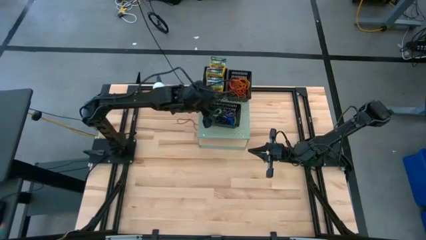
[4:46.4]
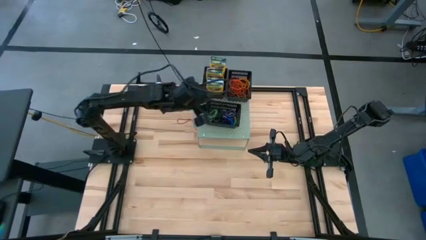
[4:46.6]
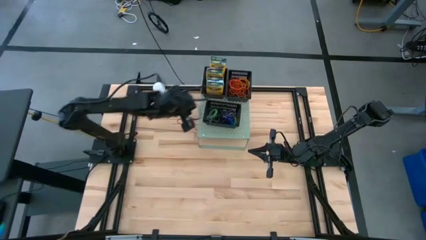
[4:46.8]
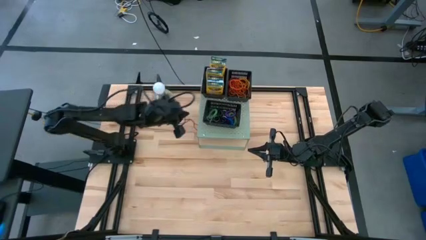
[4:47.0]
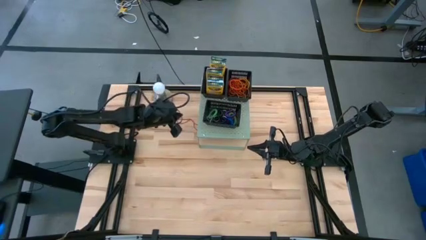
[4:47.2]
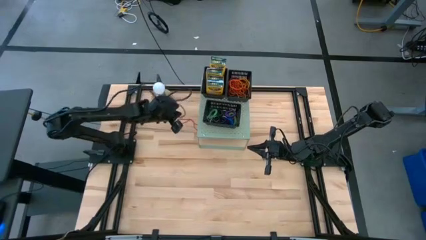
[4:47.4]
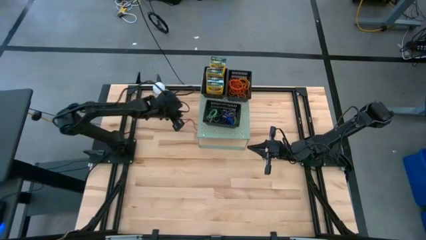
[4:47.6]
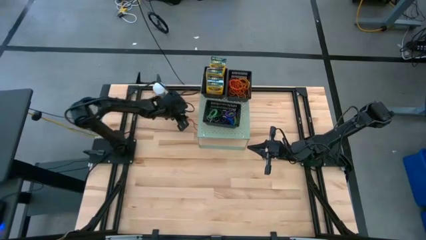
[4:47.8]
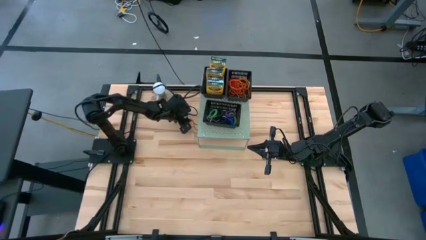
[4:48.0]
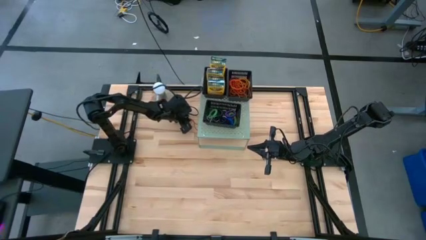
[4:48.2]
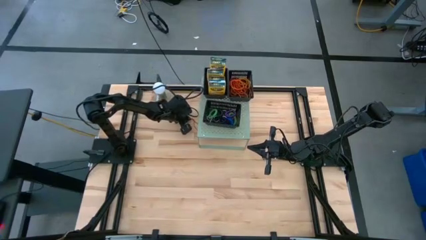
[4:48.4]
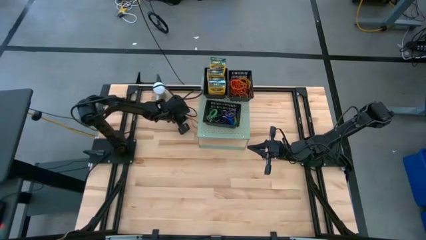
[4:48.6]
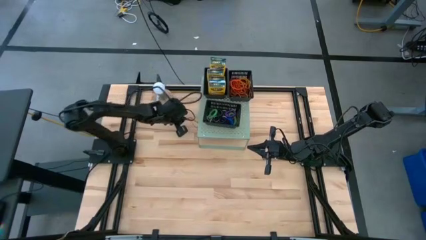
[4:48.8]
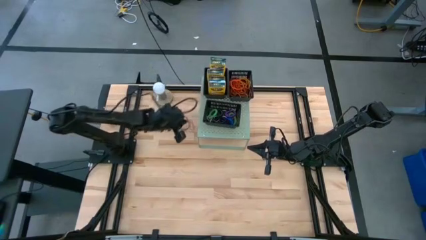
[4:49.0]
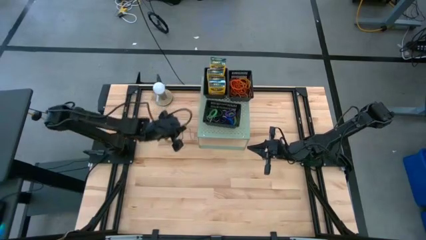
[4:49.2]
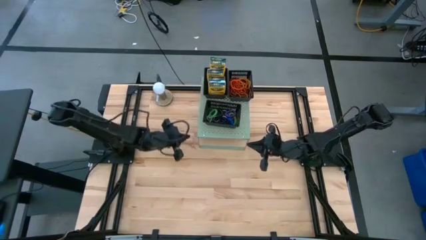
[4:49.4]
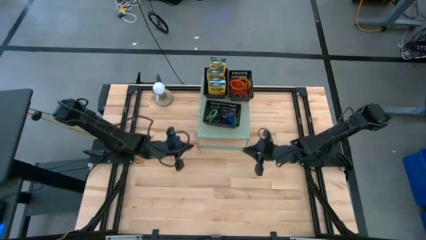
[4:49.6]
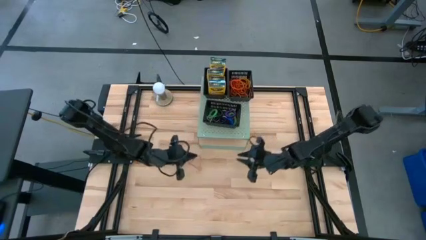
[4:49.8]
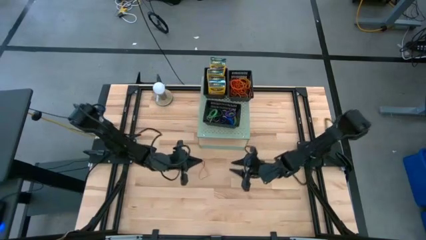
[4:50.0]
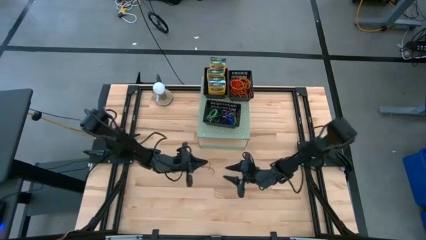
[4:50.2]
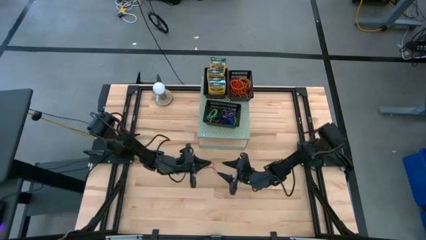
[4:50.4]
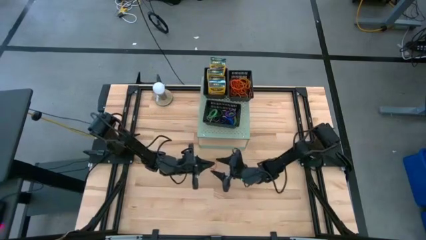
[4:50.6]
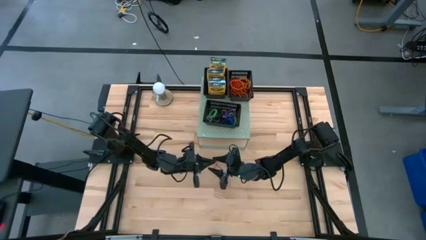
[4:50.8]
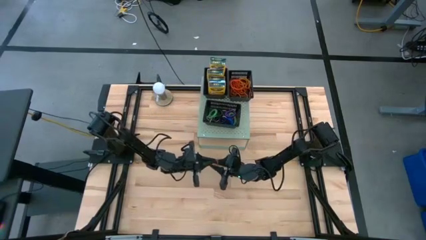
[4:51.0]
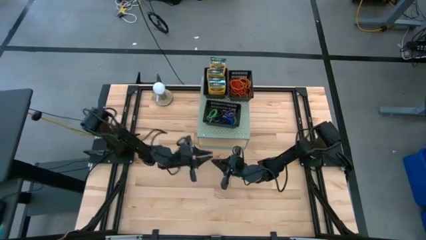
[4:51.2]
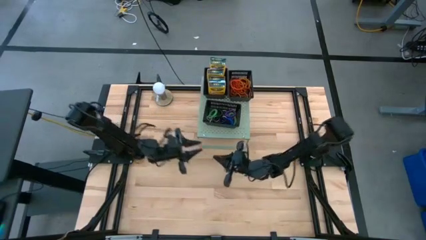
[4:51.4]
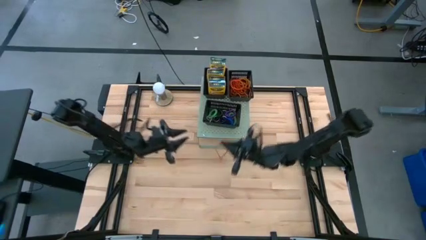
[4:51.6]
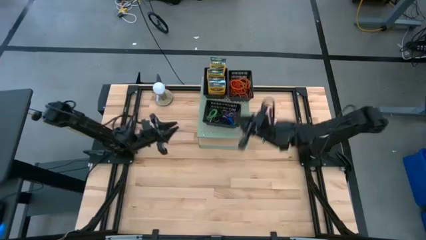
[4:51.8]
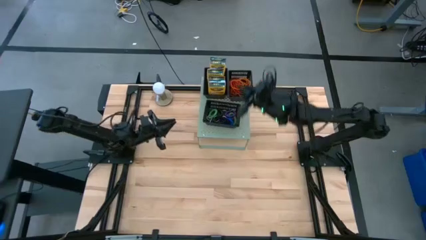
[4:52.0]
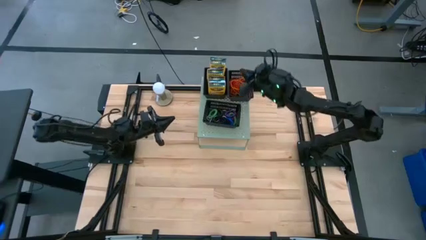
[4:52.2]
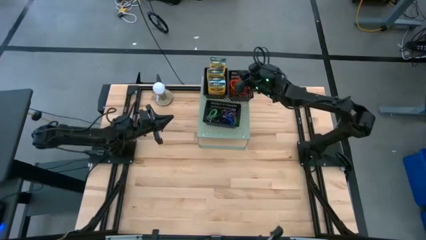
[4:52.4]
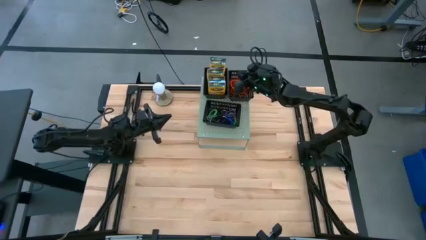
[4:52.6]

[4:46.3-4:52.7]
Task: Pick & Place Office Desk Supplies
Put the red rubber band into the top right black bin on the shelf

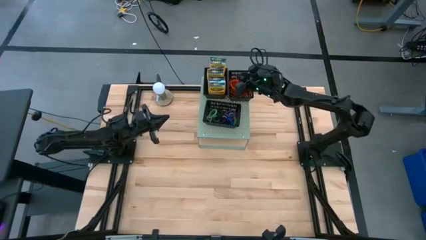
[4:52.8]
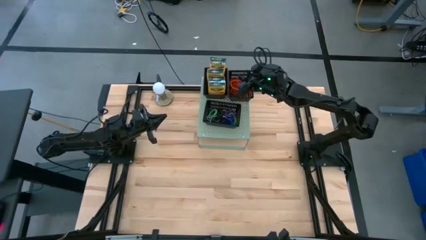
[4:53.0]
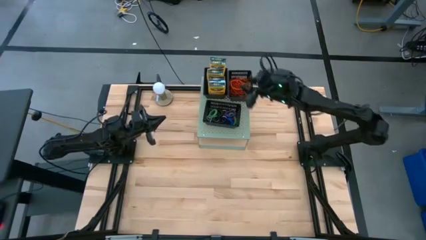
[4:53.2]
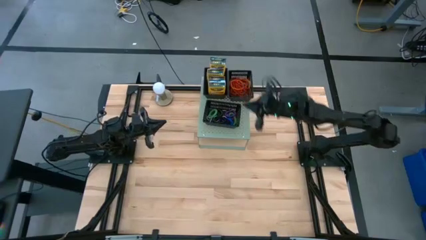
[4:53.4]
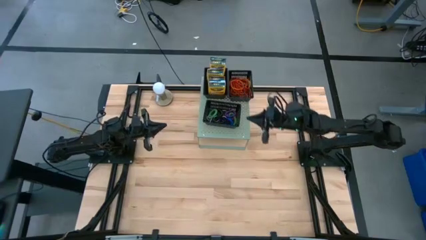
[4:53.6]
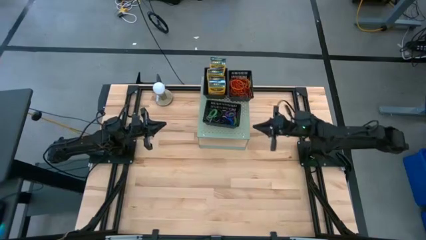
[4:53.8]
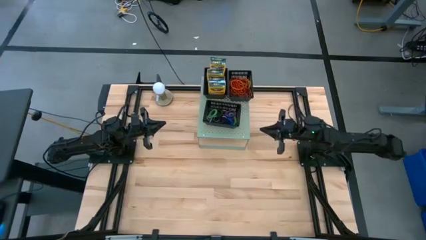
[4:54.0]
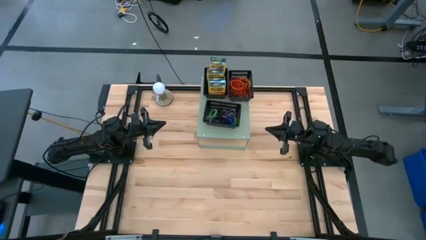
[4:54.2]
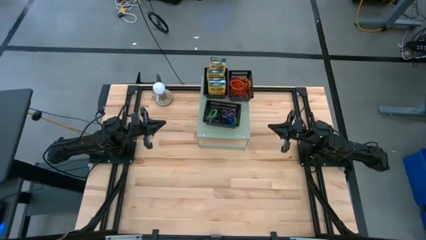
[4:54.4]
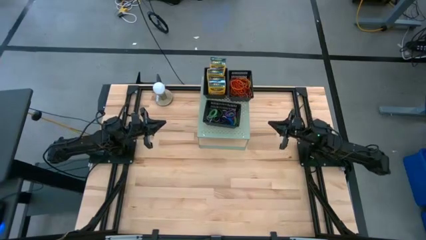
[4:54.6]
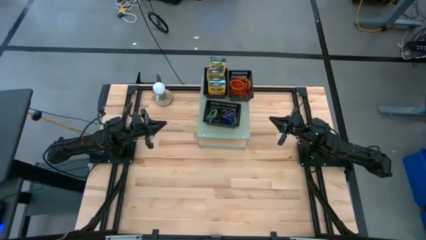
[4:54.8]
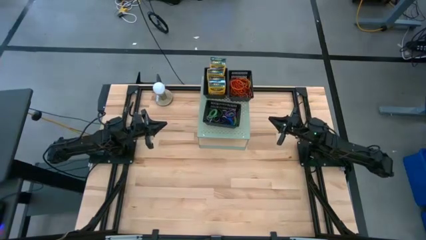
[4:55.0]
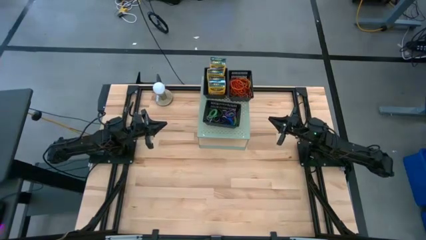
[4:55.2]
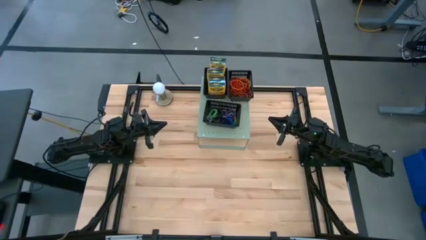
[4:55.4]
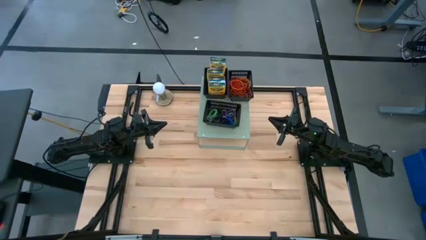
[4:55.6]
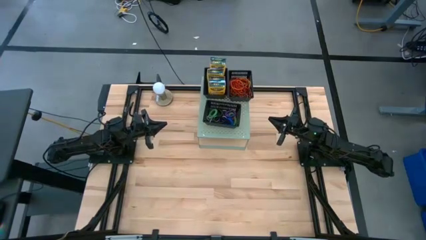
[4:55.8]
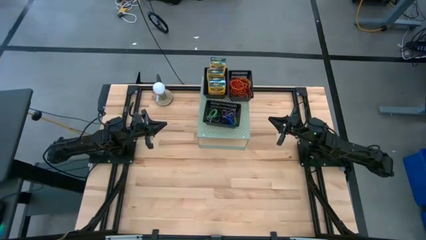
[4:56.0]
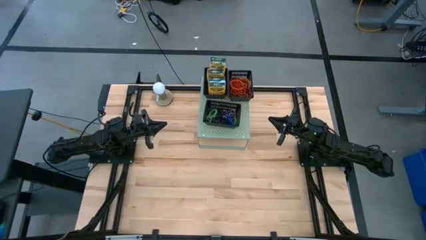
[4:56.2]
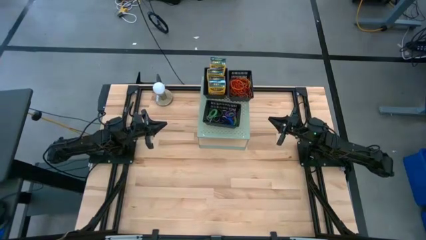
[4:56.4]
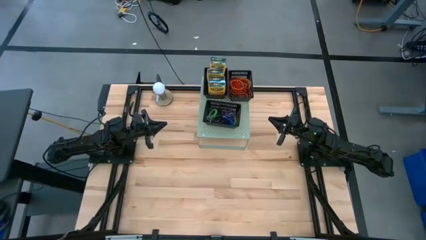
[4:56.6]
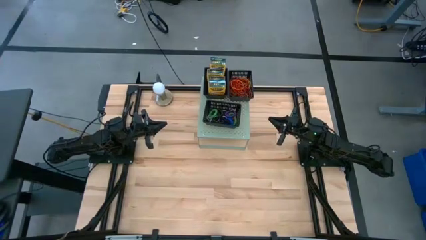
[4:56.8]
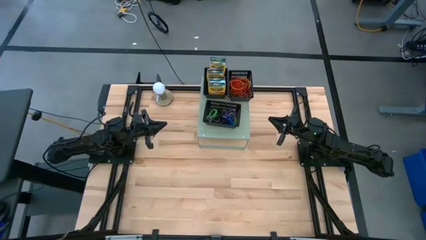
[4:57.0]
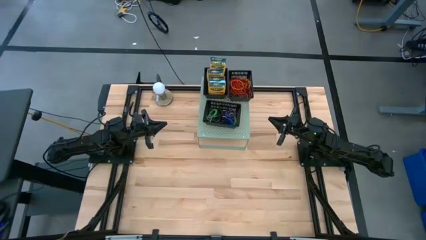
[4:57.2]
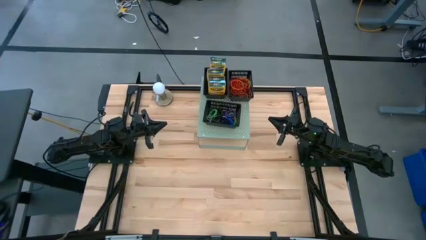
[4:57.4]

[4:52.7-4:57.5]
Return to Home Position
